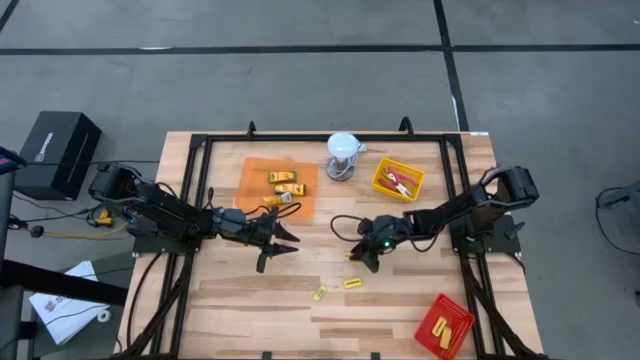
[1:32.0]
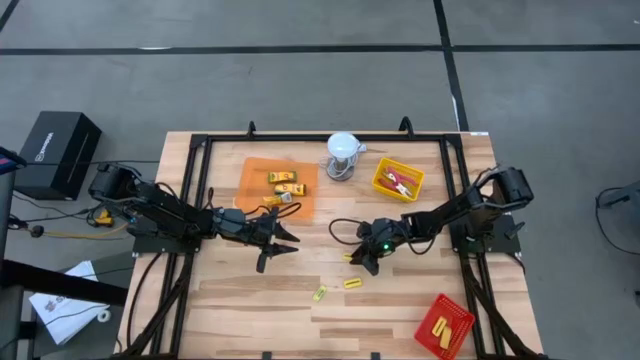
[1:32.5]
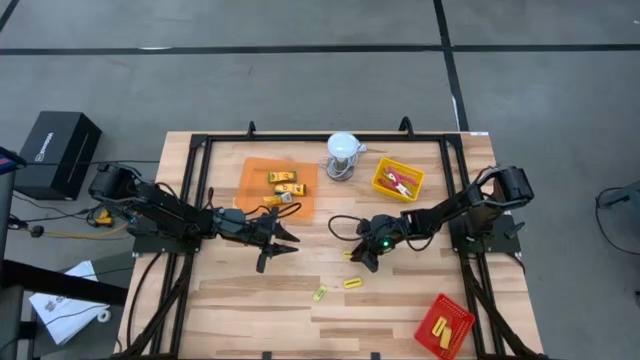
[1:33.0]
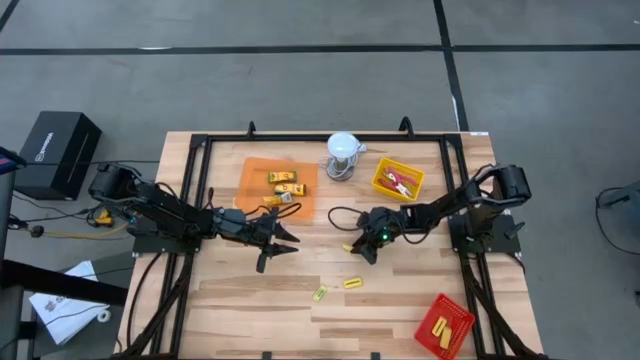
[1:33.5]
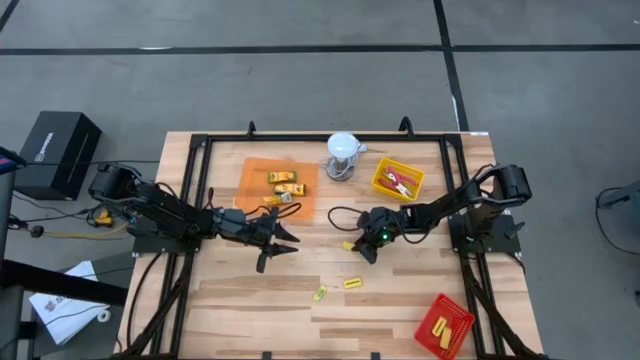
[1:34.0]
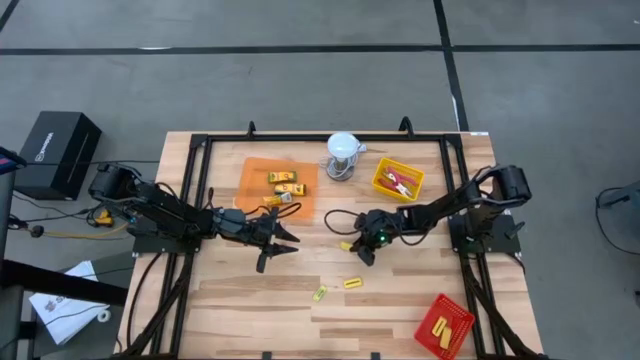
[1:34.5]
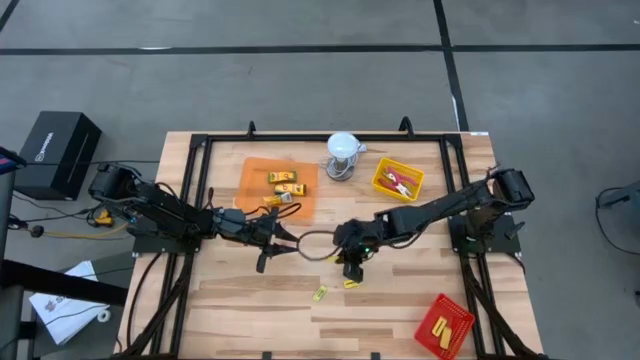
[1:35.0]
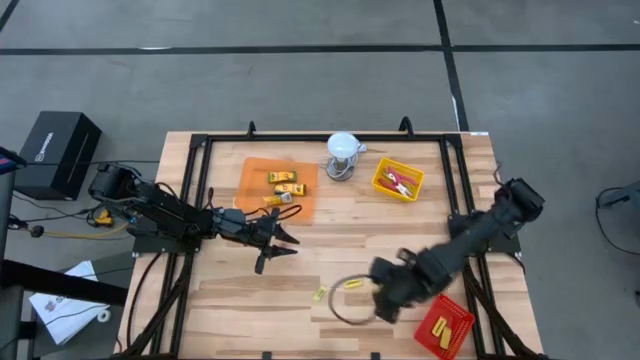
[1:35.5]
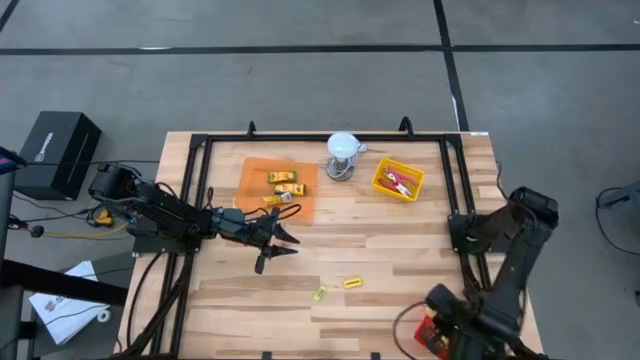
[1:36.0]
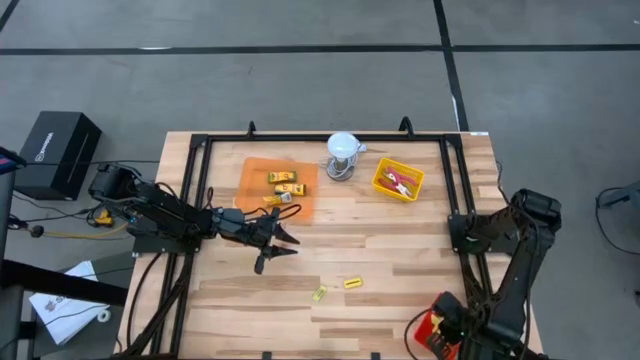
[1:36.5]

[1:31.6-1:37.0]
Task: Pick & Place School Supplies
Put the yellow eraser into the red bin

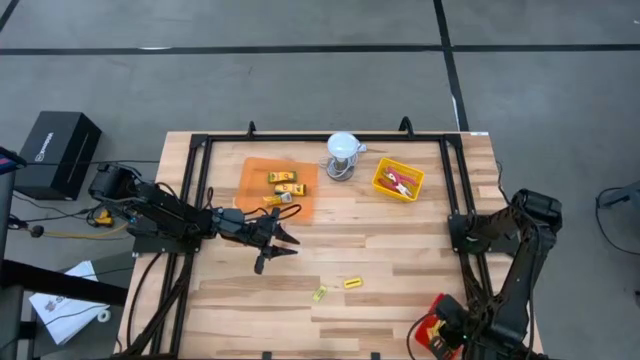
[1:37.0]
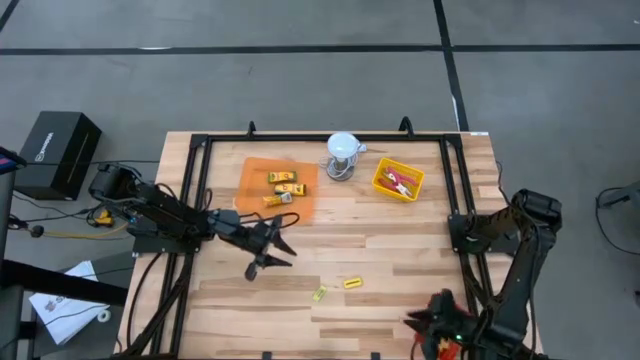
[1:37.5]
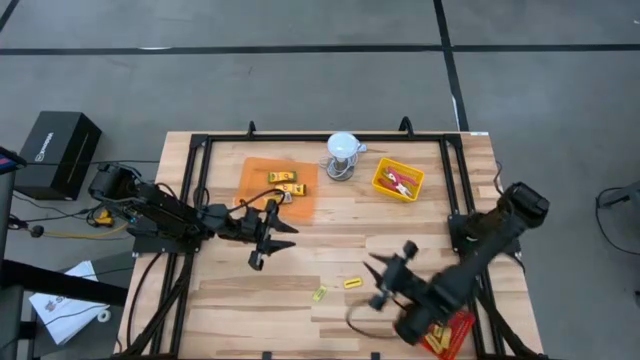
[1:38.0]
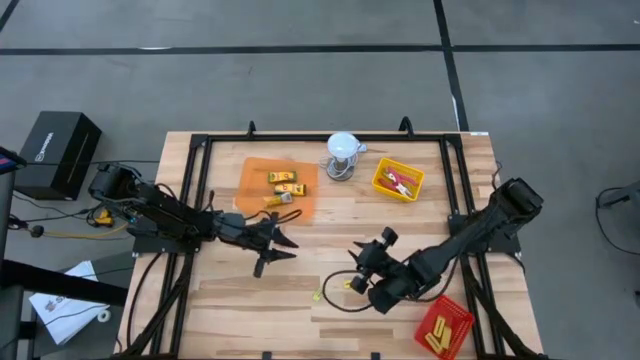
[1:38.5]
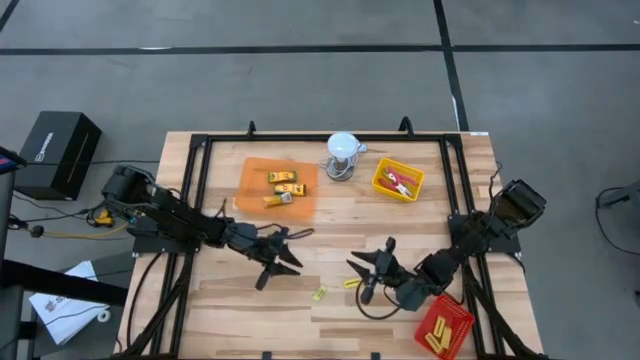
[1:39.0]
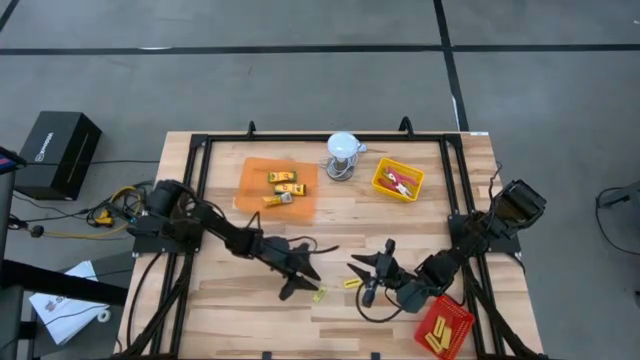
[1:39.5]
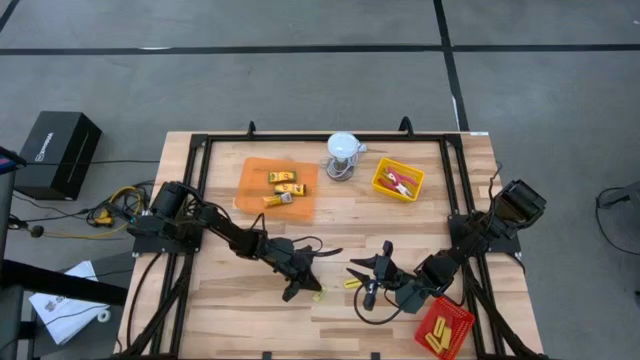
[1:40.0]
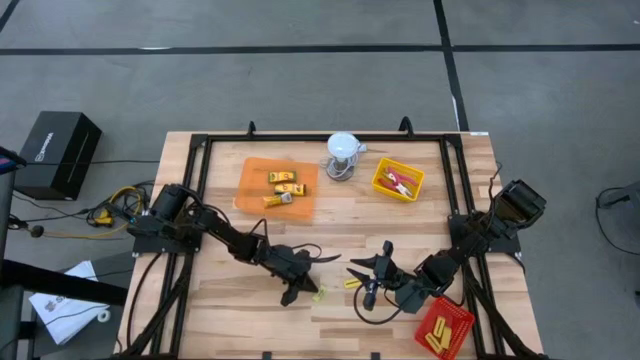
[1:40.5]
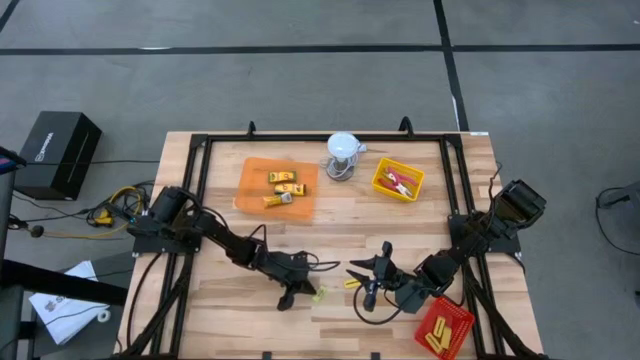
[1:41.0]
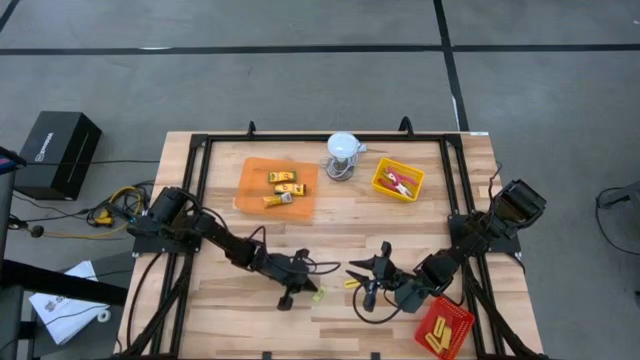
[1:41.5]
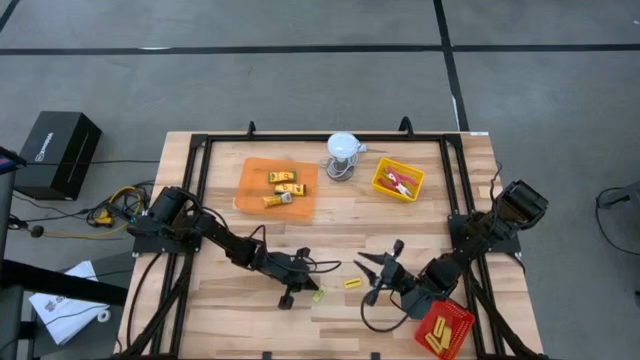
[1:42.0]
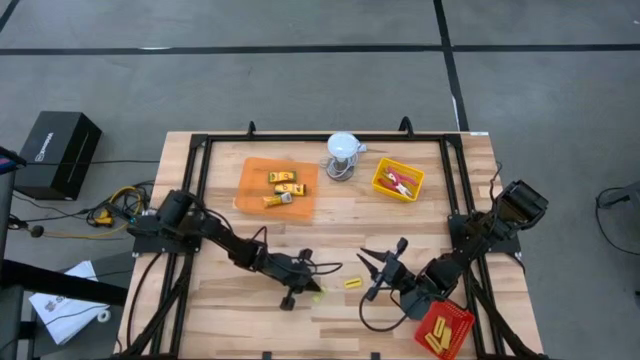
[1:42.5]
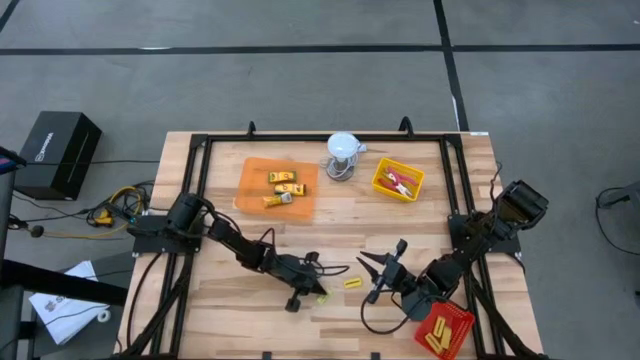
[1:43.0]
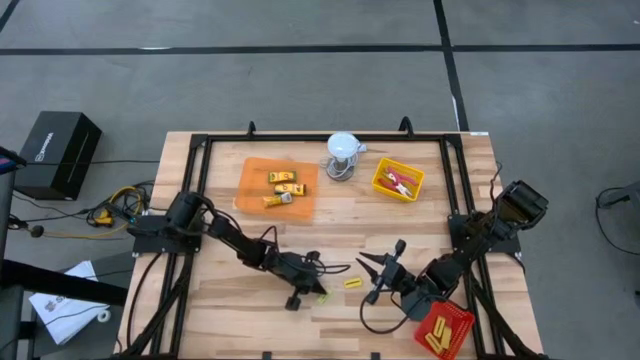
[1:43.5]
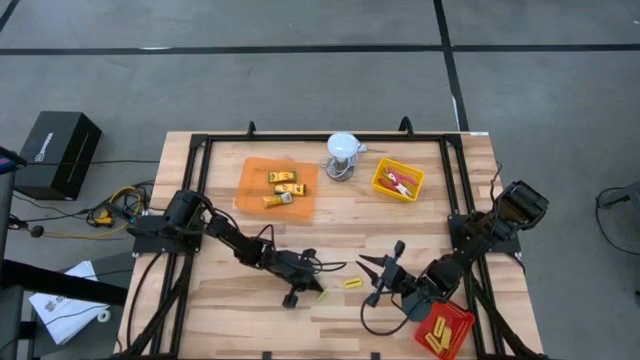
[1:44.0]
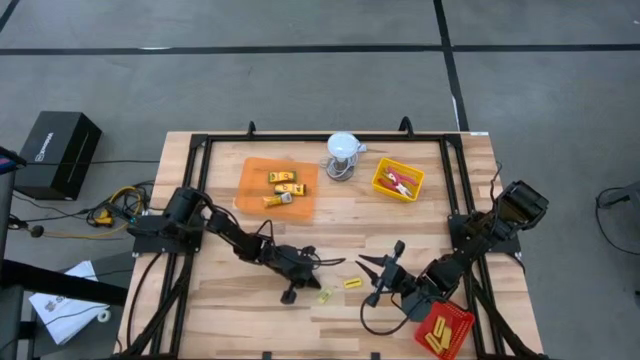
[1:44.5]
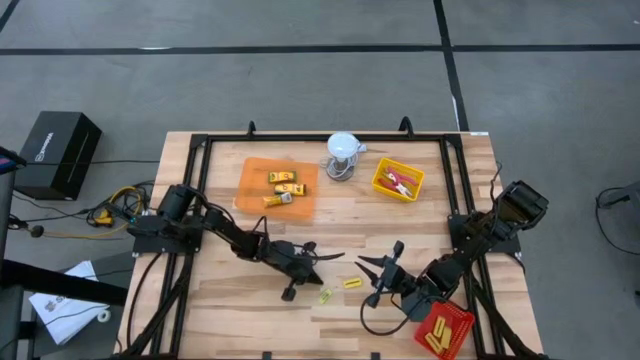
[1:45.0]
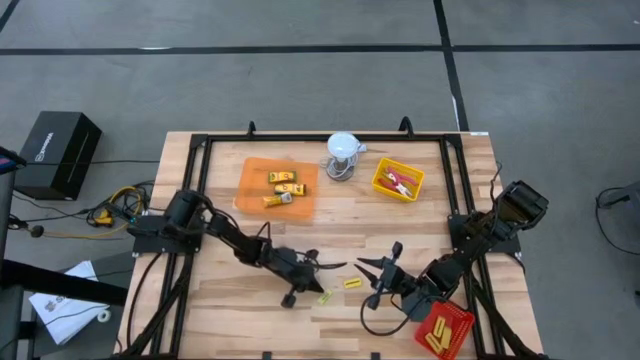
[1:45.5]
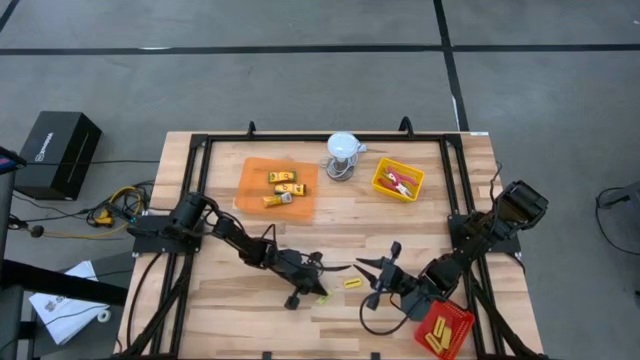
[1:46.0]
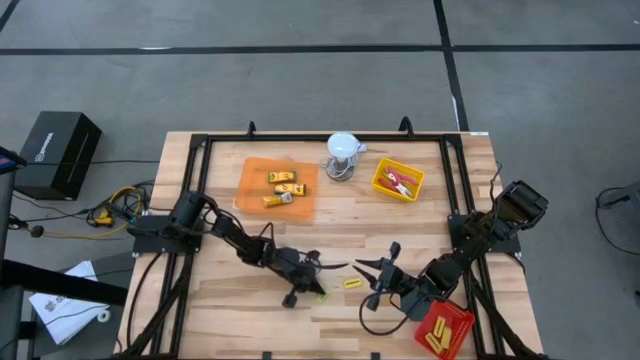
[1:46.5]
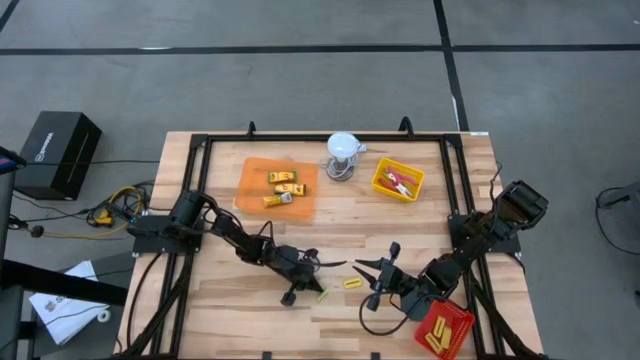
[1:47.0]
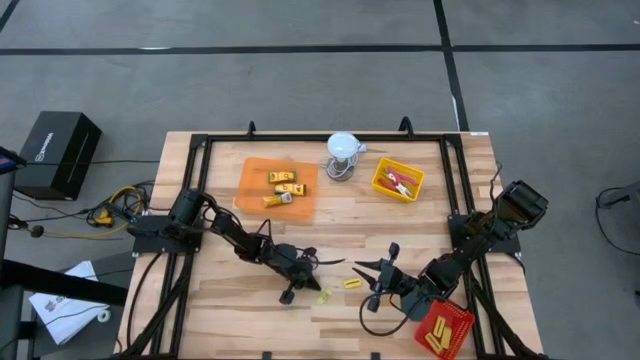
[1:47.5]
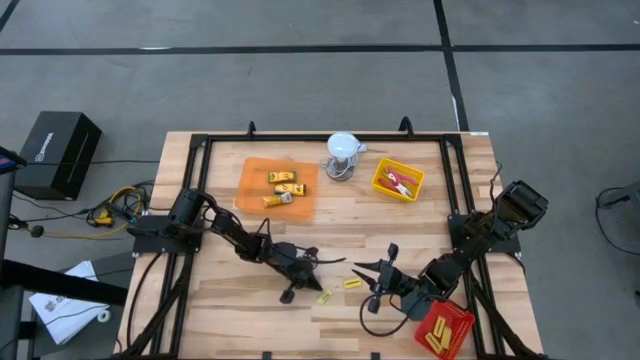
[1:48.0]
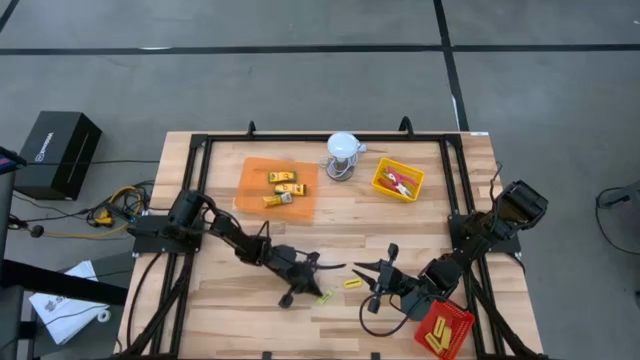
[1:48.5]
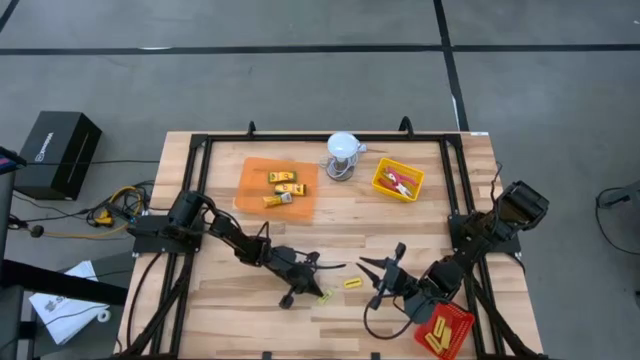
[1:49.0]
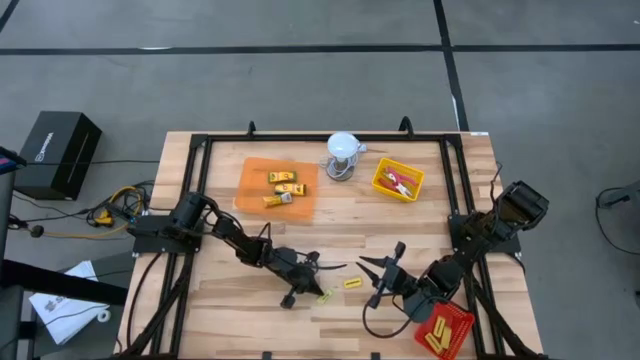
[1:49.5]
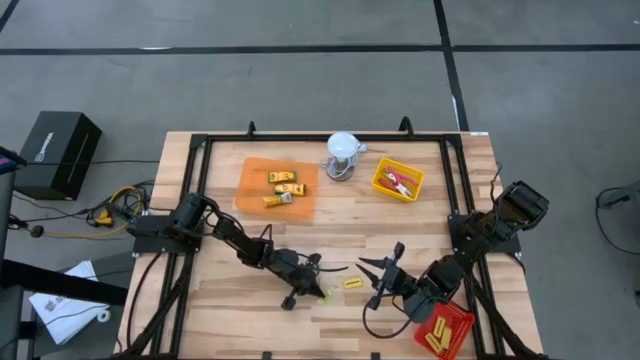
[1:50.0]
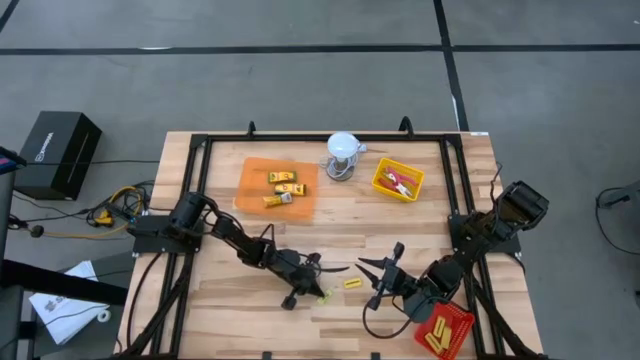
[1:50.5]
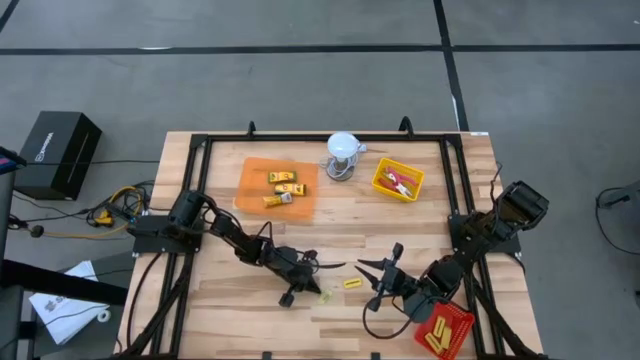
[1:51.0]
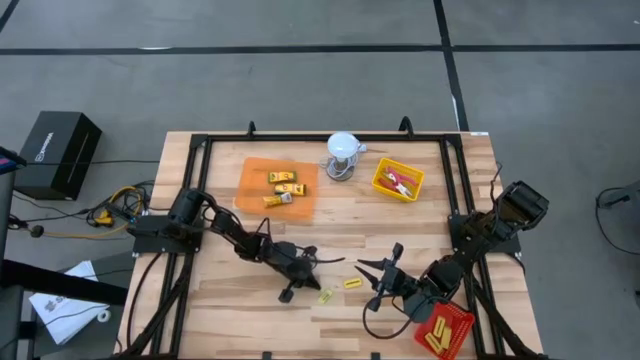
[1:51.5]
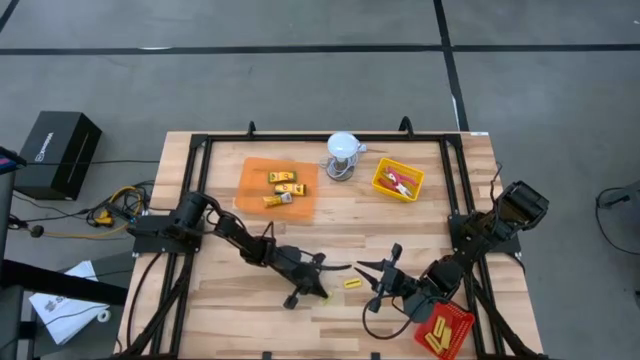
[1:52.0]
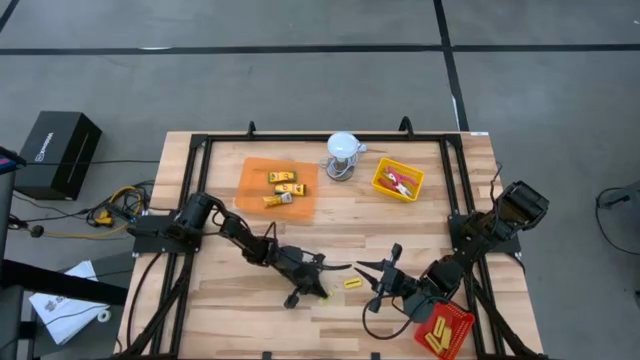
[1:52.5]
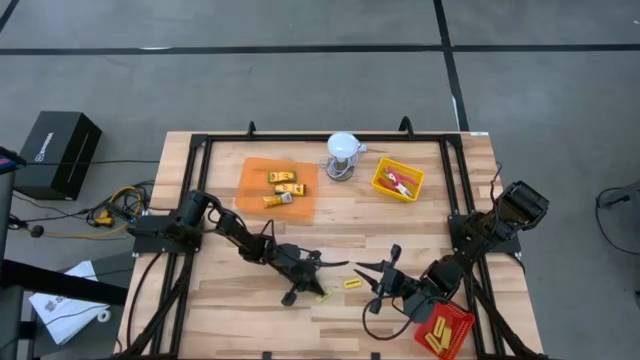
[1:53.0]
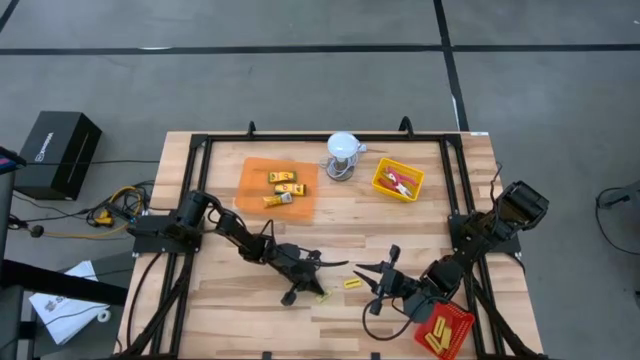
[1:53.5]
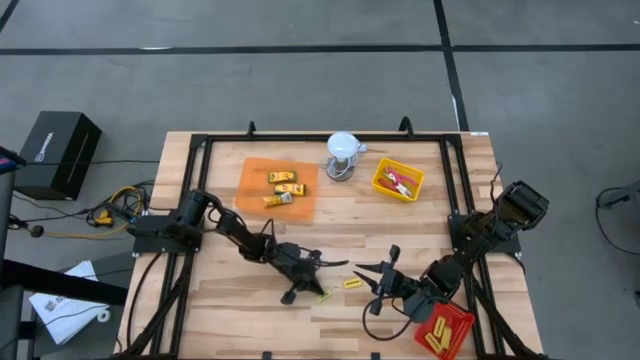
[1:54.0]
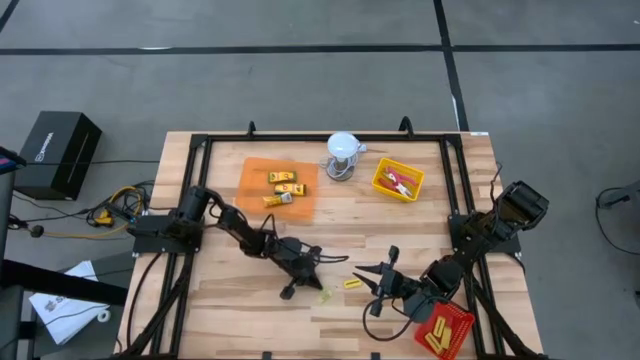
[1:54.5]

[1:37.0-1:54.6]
Adjust the green eraser
